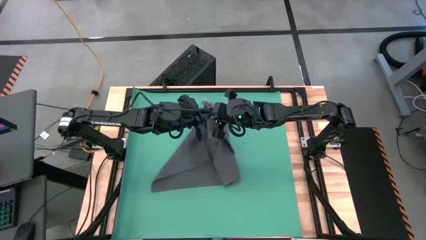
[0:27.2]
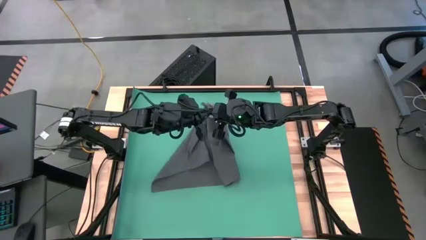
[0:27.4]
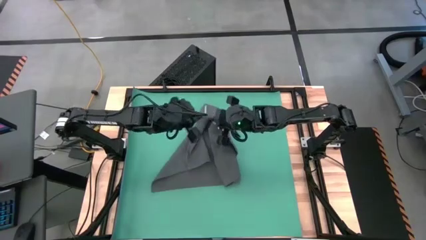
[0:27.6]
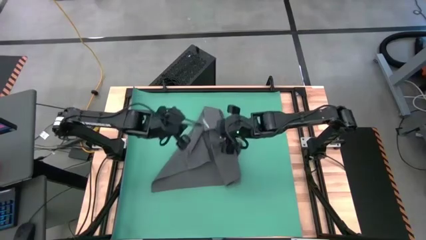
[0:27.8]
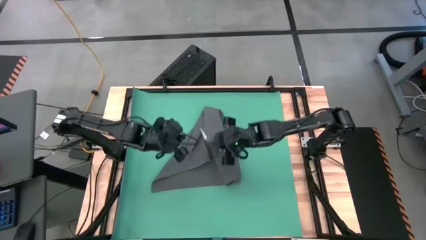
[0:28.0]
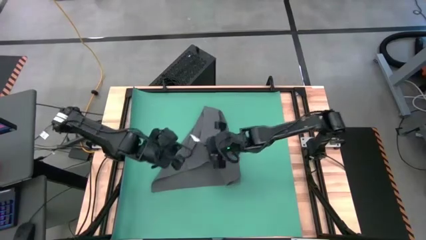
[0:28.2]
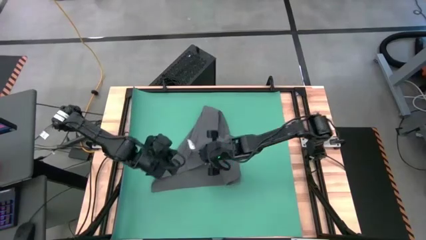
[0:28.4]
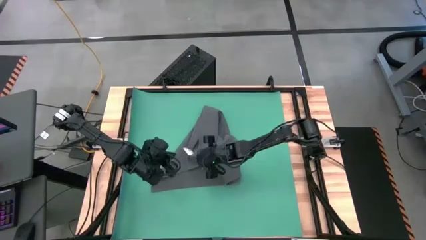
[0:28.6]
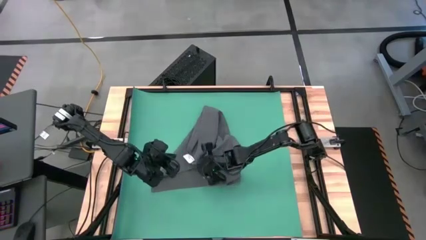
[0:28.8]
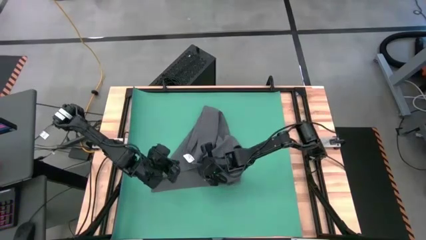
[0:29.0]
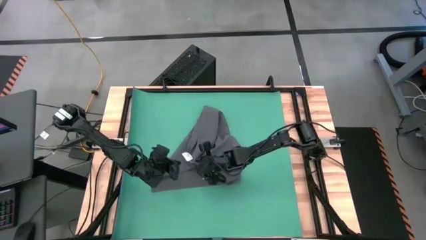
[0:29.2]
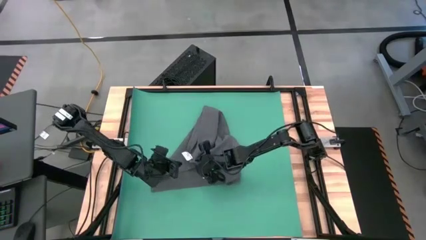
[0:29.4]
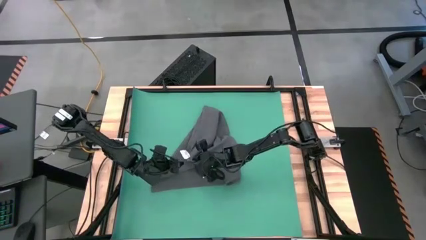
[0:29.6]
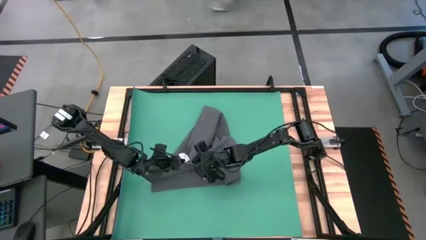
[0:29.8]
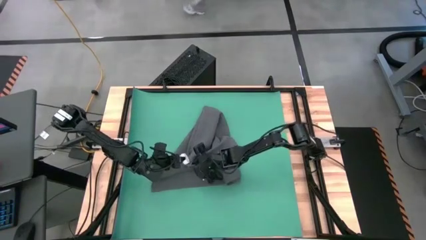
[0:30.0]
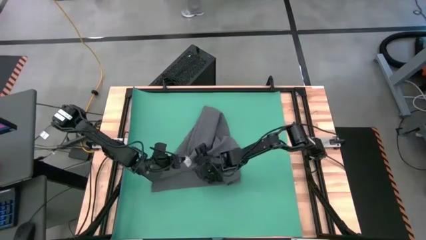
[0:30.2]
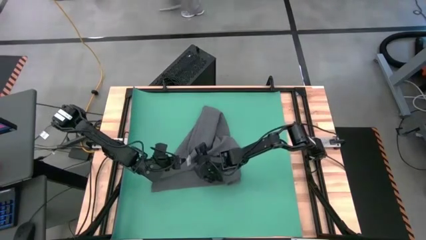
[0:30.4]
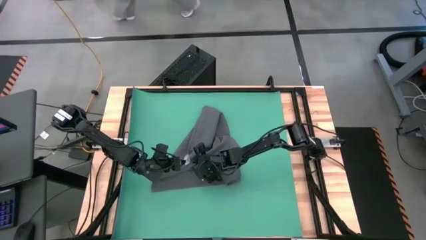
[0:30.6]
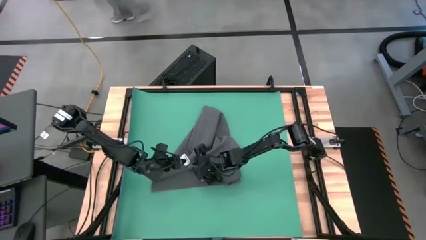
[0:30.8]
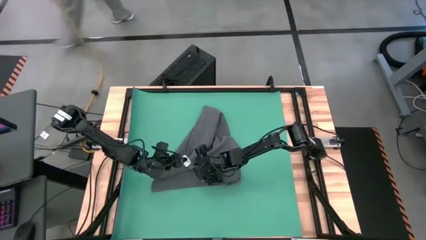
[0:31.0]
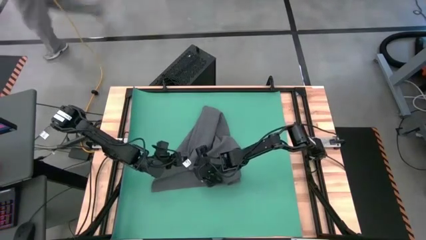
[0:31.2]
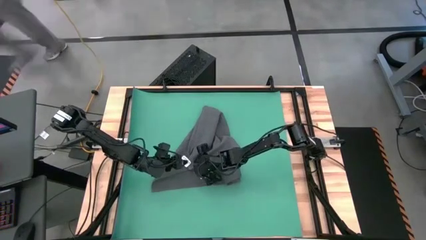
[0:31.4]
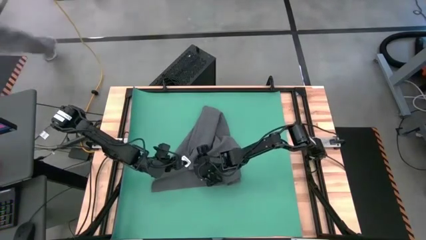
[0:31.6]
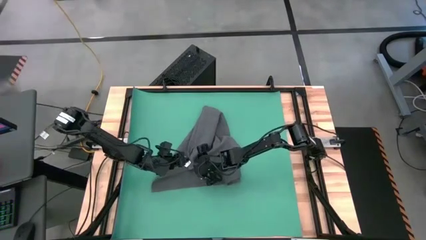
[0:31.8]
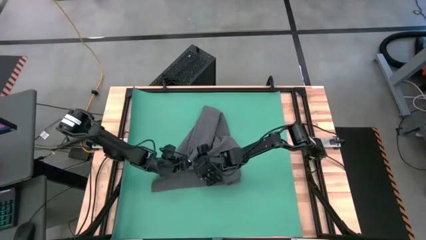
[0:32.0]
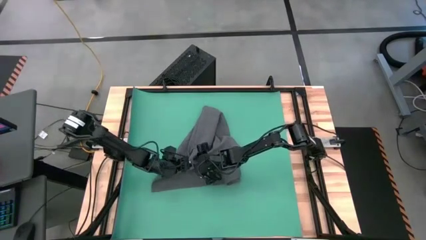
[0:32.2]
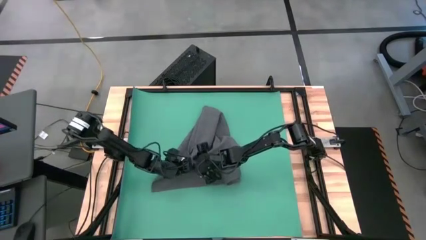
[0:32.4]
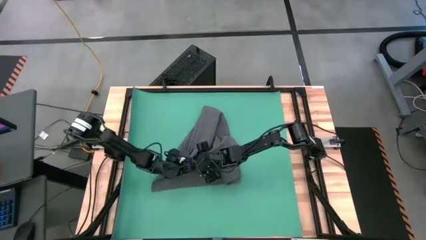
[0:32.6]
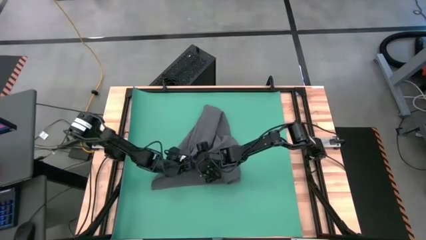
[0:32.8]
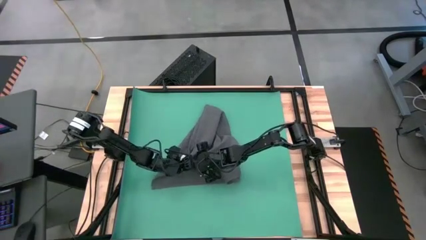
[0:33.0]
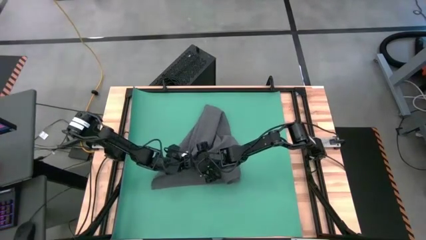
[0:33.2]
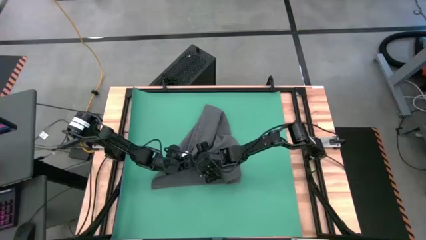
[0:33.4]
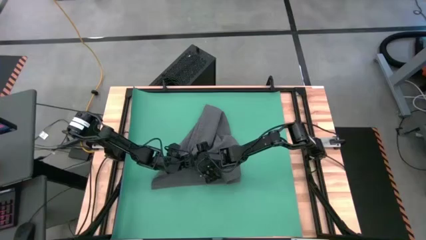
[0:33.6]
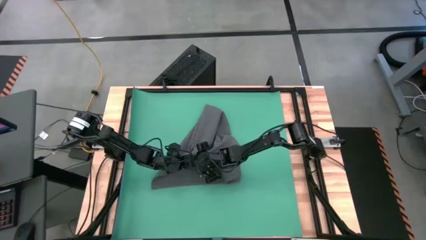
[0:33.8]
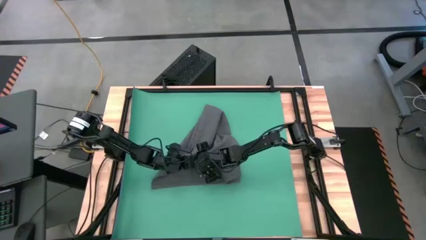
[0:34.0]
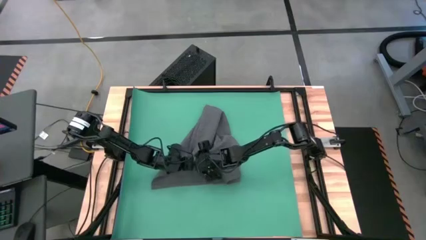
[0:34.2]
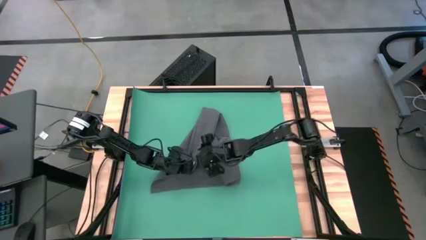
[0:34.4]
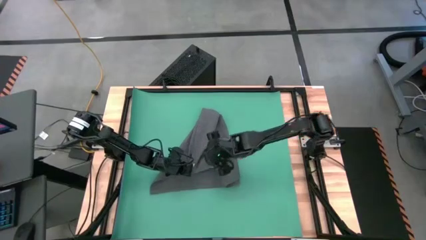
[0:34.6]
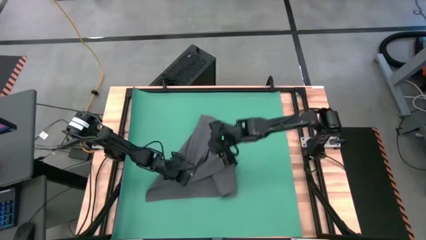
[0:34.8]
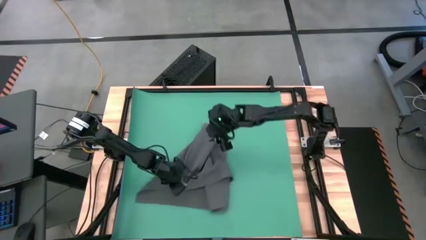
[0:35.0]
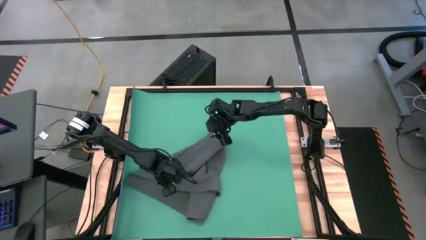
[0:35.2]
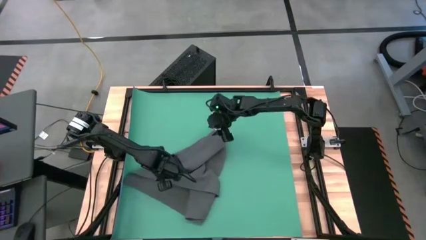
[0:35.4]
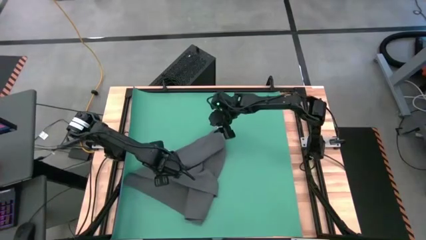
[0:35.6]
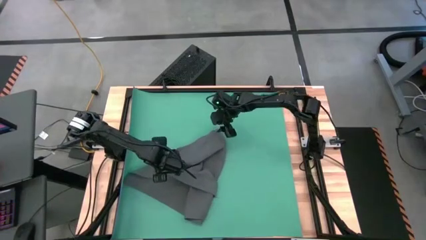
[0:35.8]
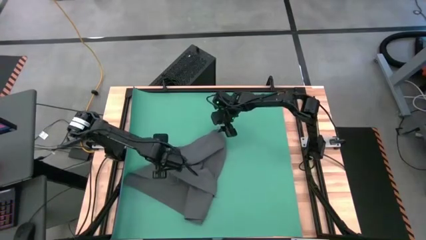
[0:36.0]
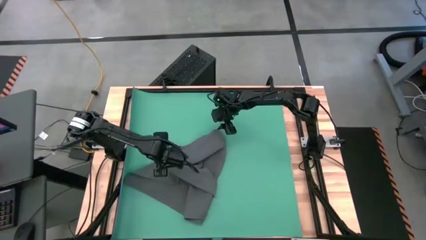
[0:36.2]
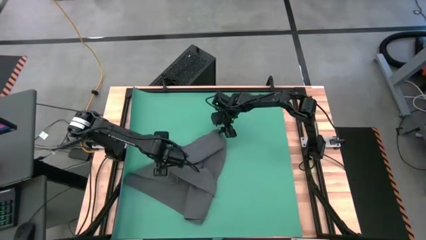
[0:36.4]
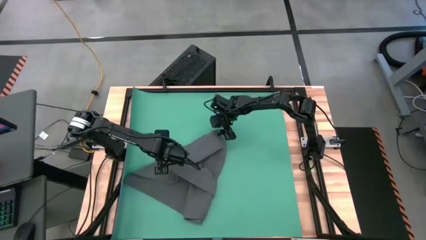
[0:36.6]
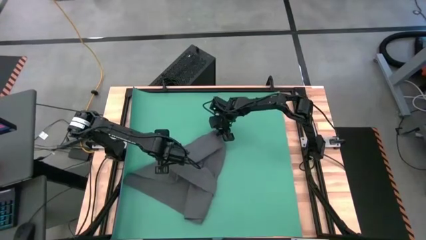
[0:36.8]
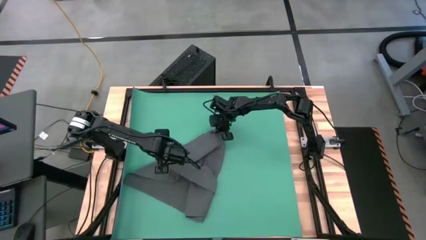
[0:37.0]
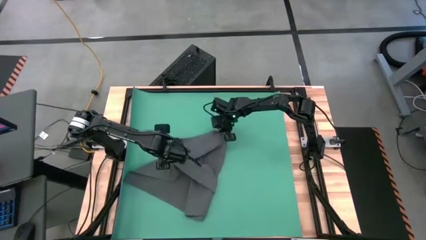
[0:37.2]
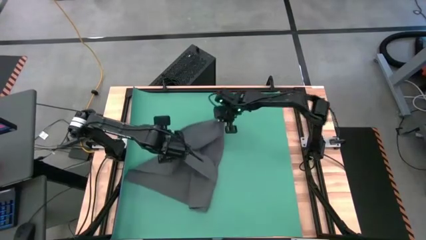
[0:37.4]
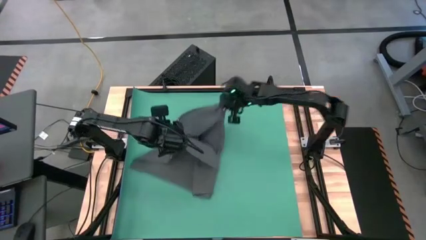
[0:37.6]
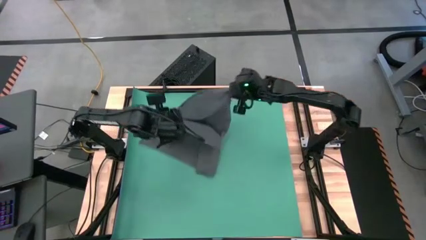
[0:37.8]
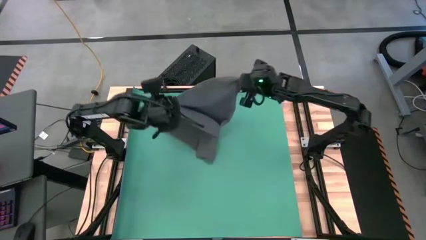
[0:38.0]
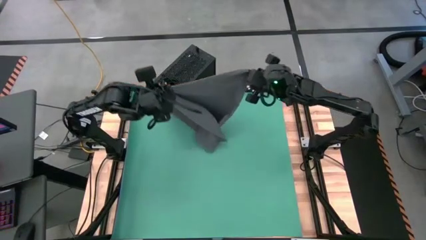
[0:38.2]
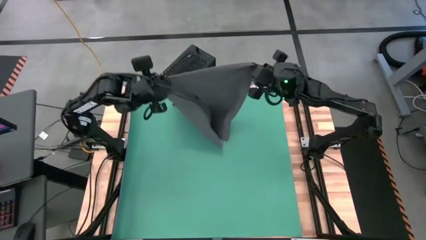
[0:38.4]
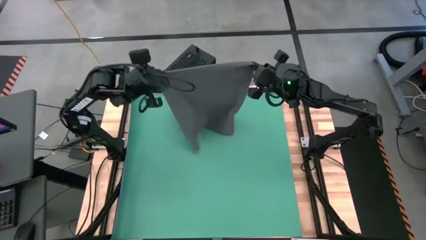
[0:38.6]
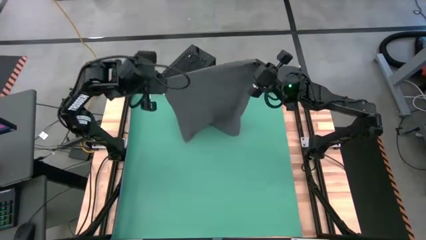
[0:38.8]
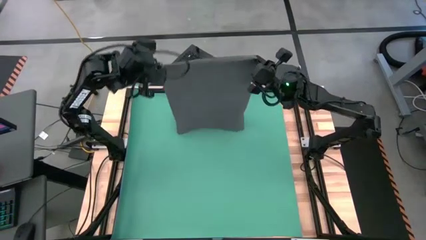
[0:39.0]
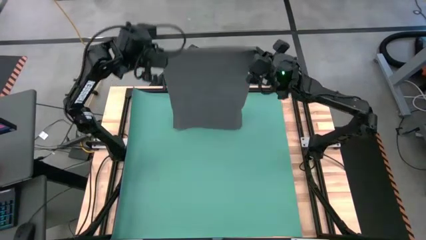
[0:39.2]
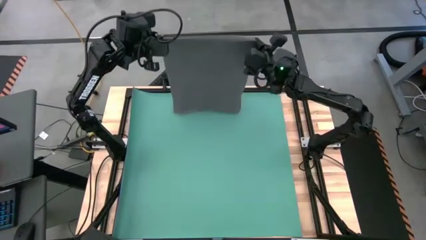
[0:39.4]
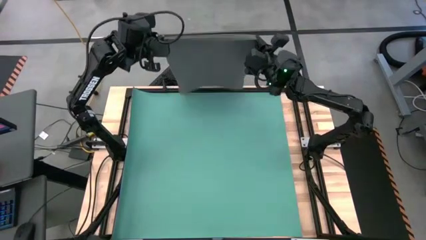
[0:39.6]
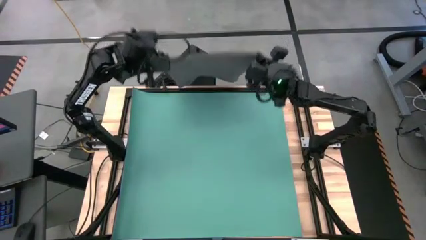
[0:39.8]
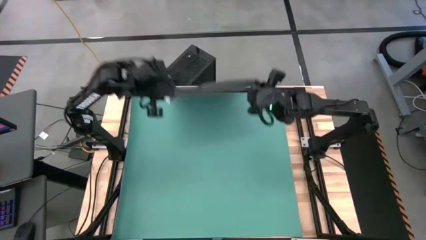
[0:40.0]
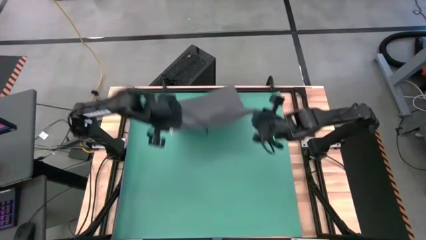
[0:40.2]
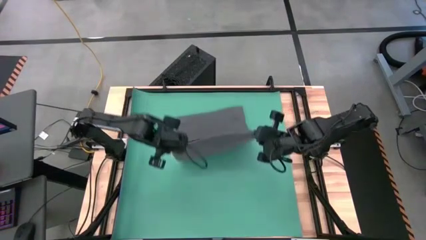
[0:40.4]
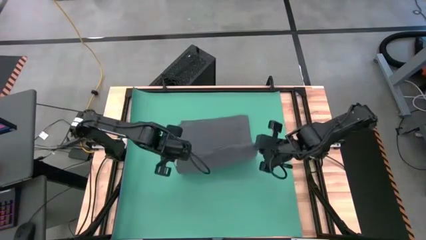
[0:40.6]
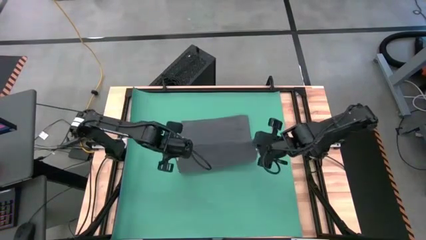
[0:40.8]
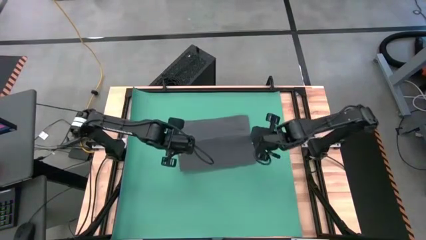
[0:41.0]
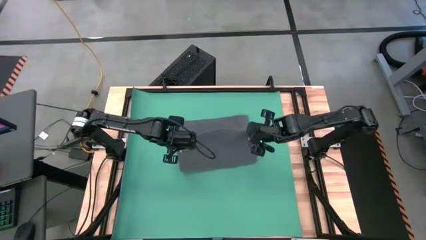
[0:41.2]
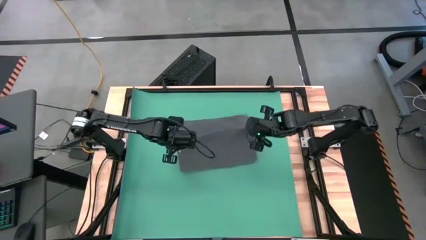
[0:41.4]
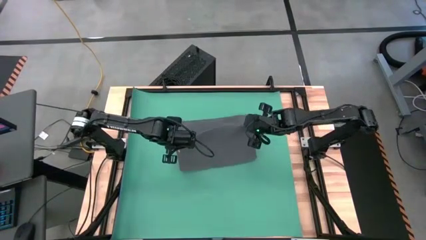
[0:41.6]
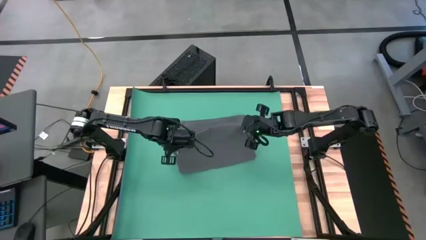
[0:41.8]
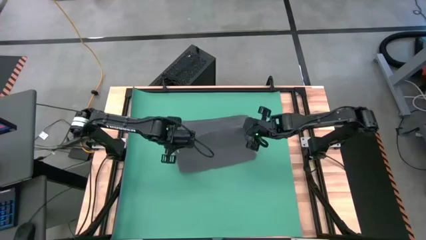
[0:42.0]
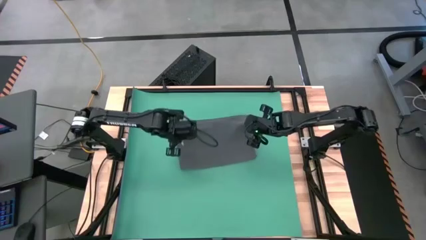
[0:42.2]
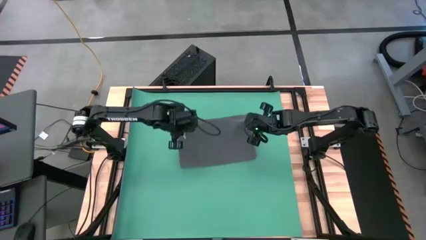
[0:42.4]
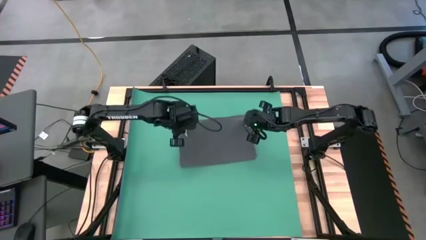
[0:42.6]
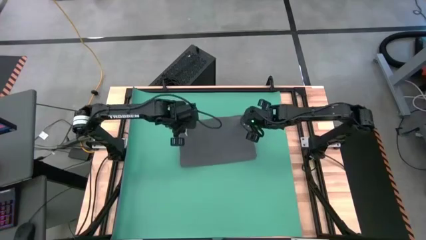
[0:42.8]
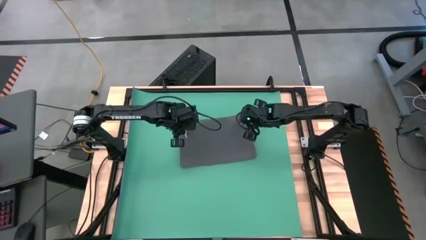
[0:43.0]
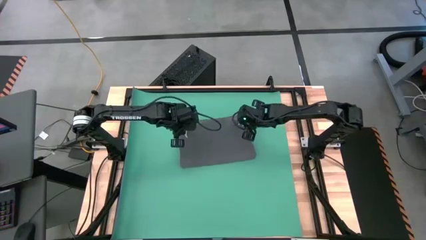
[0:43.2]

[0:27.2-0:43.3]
Task: Roll towel
Roll the gray towel
